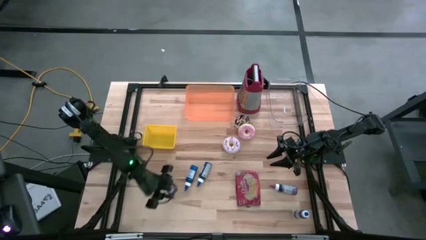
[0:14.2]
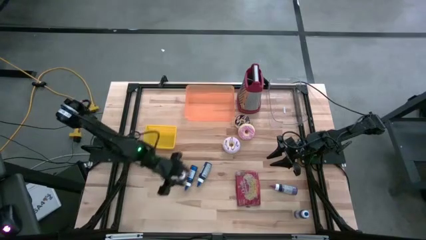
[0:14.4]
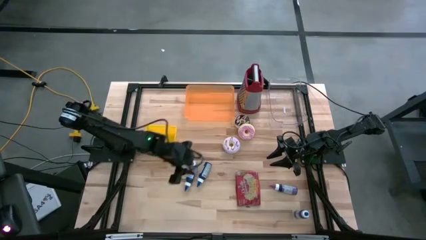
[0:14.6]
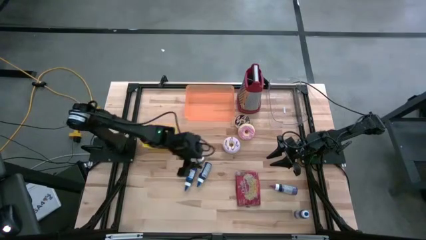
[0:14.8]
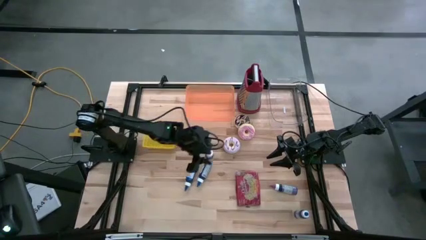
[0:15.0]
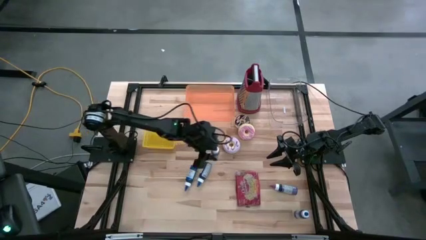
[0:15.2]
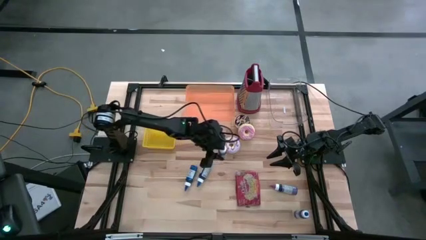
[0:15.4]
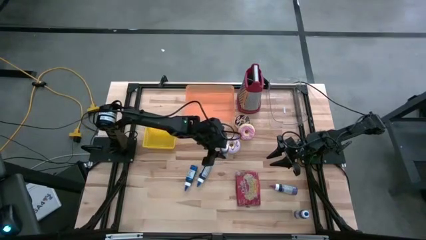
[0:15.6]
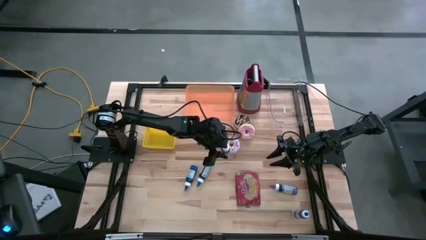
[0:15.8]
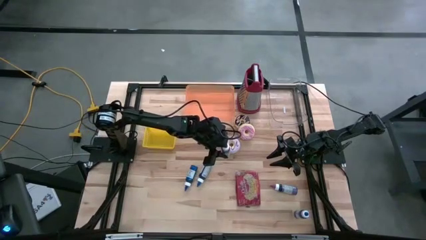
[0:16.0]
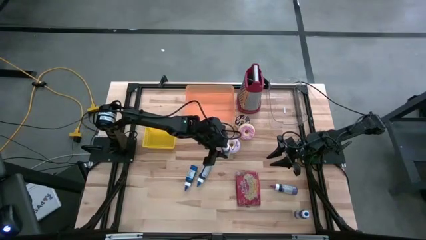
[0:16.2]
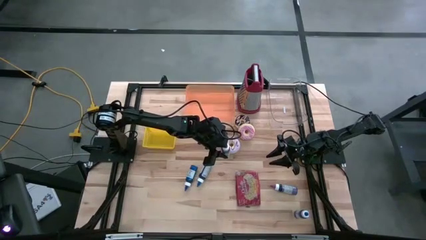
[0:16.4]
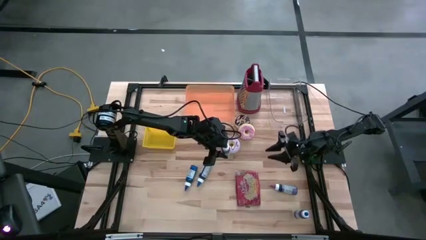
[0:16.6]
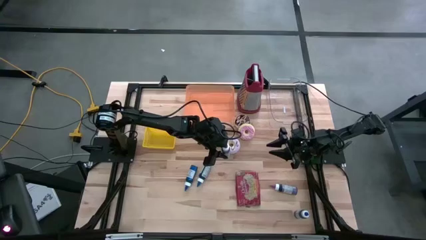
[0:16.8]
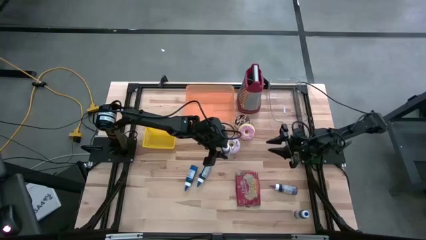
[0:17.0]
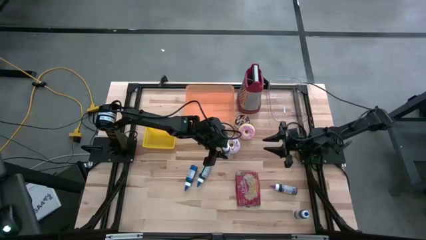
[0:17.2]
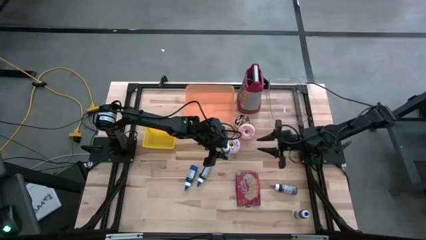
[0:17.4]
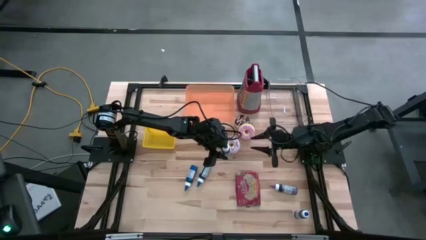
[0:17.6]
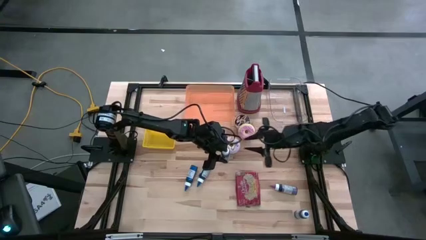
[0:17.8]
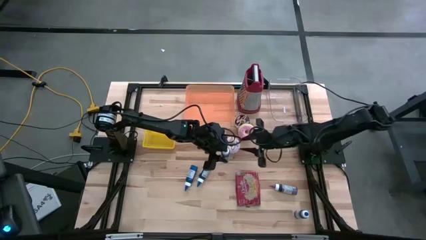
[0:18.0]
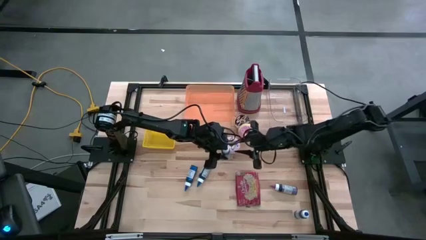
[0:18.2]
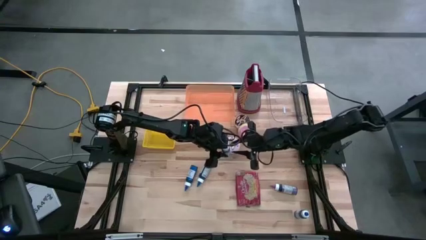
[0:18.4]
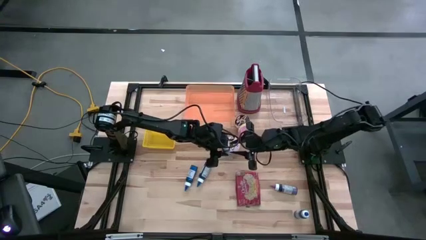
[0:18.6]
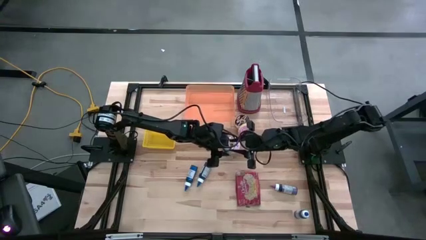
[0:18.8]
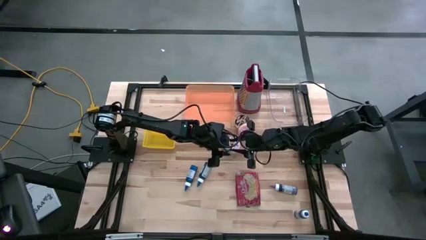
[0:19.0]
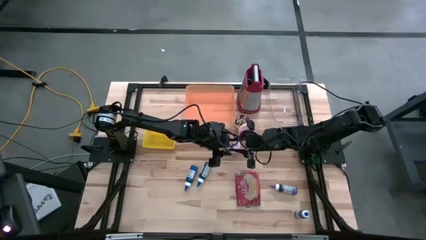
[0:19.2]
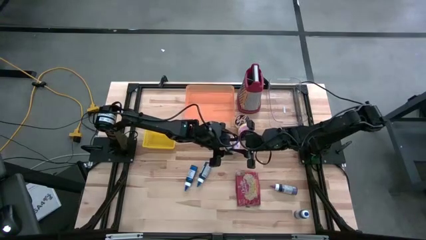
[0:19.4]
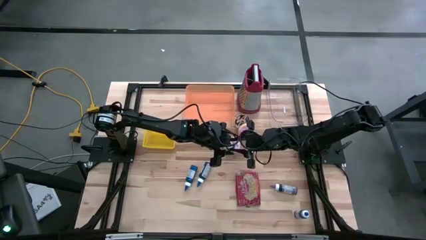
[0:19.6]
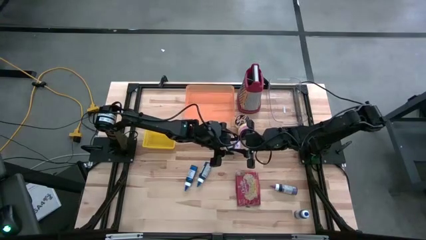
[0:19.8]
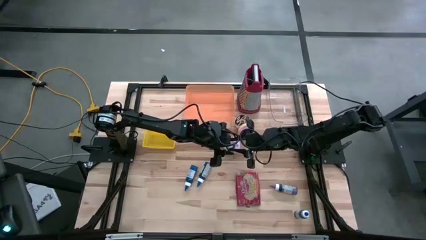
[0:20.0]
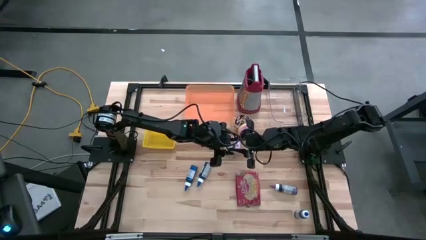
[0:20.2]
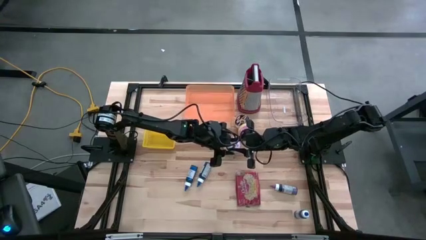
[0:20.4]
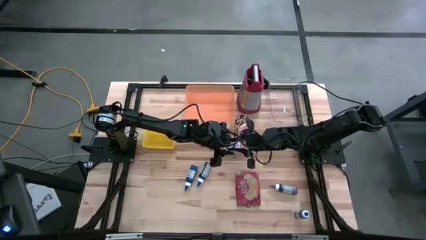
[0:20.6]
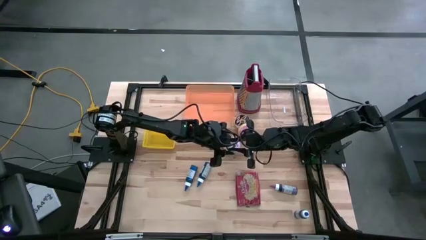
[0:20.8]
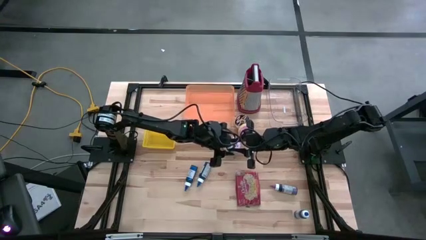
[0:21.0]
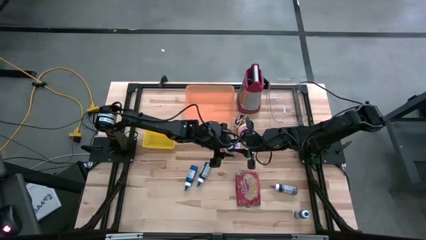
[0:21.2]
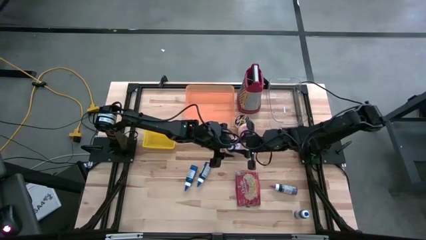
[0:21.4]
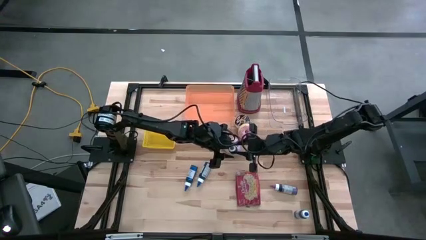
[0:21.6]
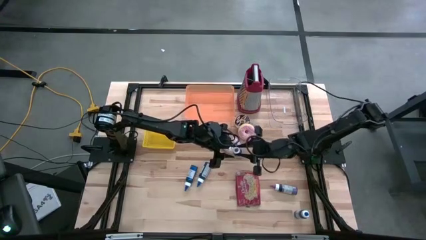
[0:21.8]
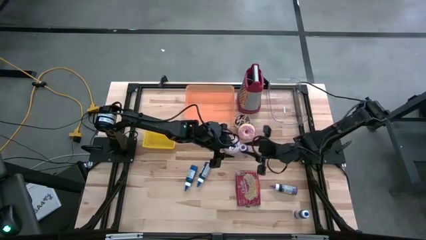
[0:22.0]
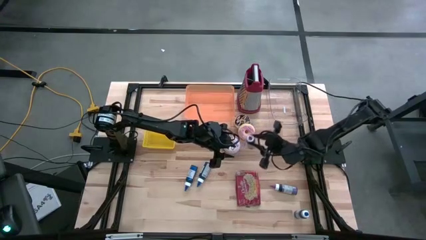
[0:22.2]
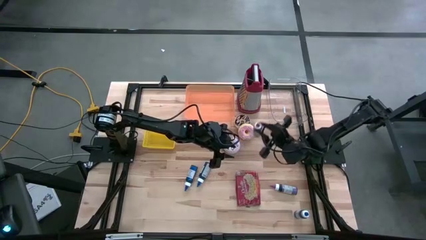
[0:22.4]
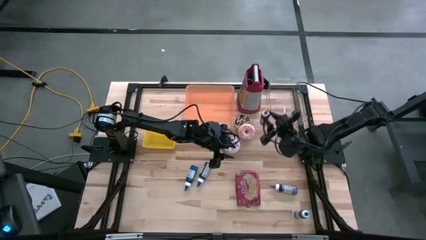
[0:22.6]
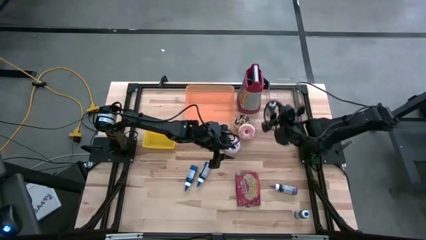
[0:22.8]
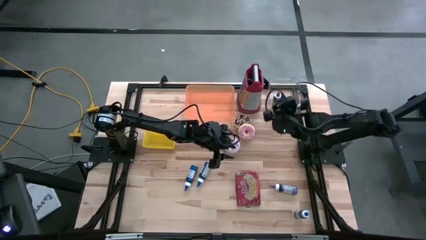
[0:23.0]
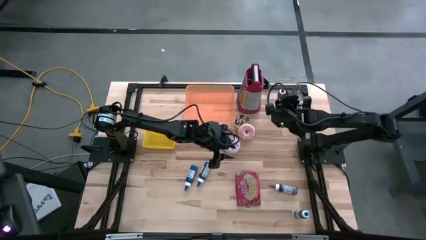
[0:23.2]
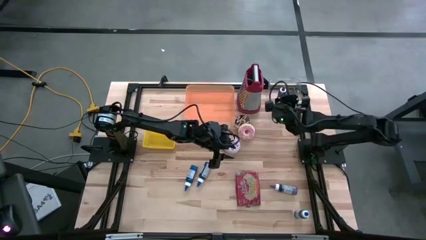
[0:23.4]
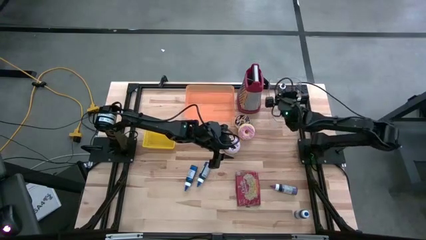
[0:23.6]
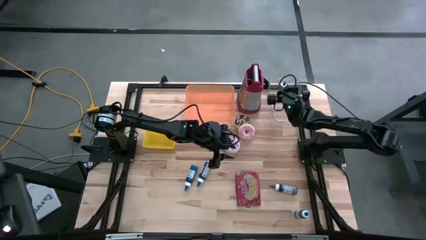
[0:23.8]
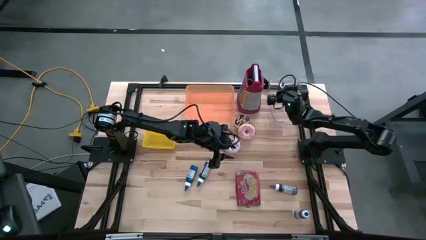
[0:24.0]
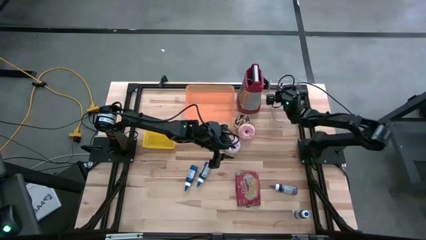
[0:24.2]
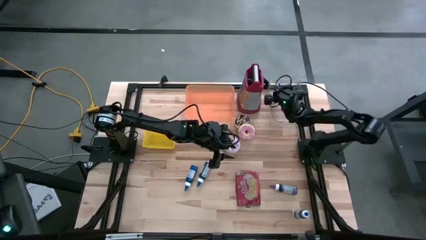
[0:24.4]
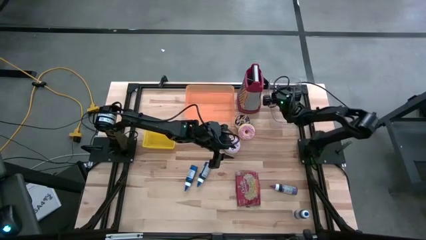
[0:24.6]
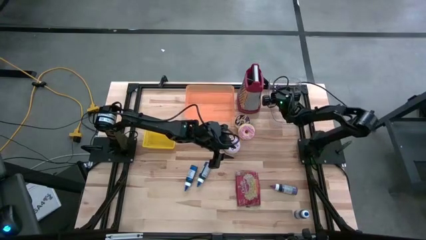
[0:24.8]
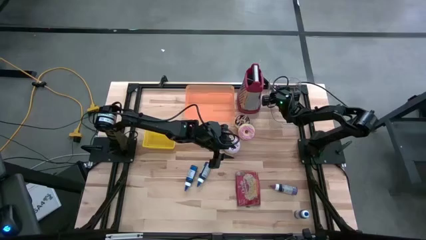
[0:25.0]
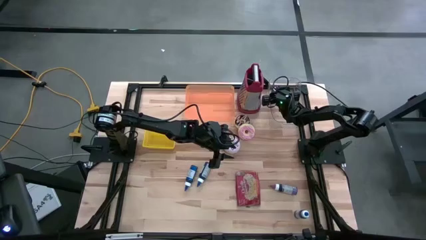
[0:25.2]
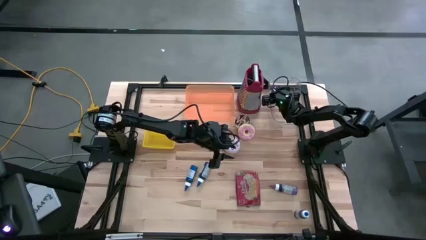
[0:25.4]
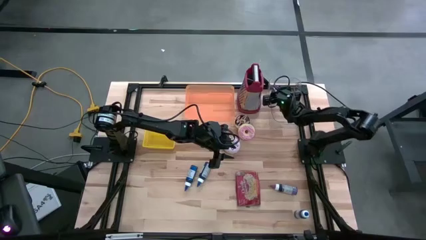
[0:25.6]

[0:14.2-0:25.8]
Task: Pick & Place Food Item
Put the left violet food coloring bottle into the transparent bin
